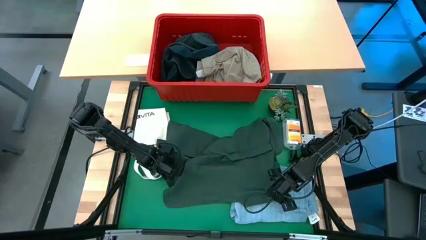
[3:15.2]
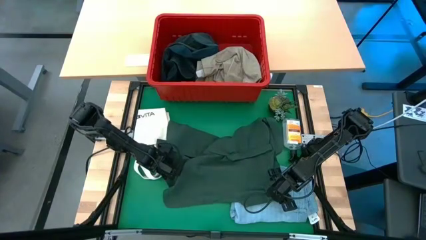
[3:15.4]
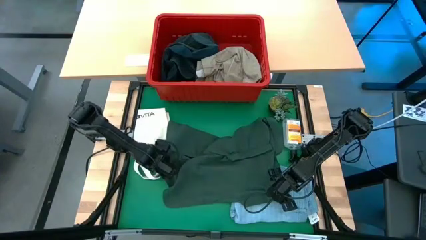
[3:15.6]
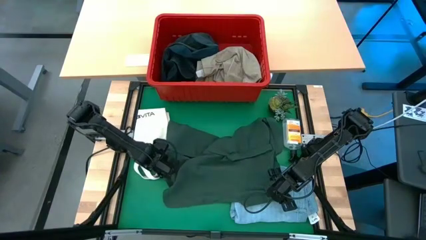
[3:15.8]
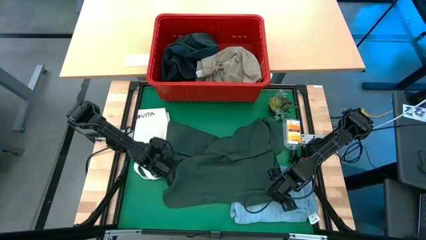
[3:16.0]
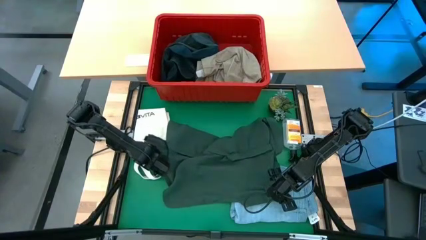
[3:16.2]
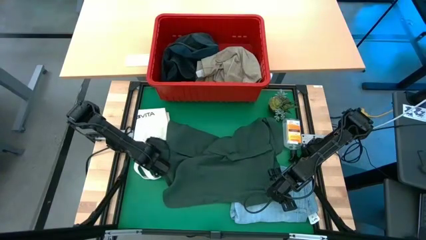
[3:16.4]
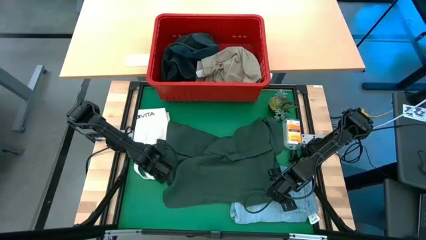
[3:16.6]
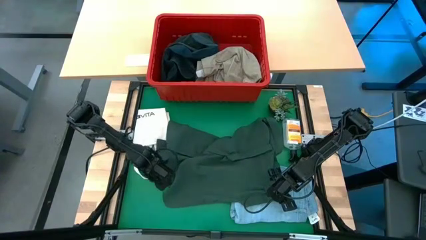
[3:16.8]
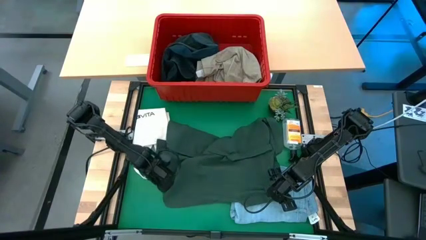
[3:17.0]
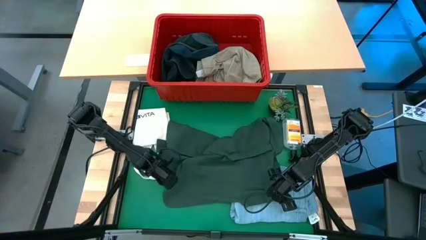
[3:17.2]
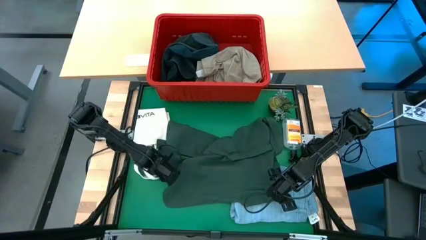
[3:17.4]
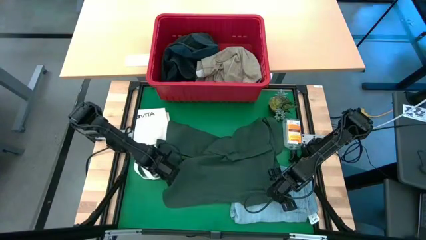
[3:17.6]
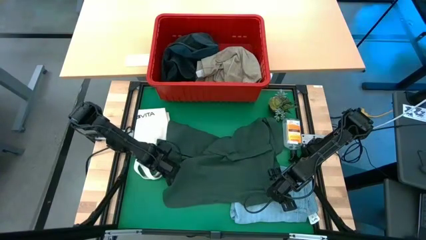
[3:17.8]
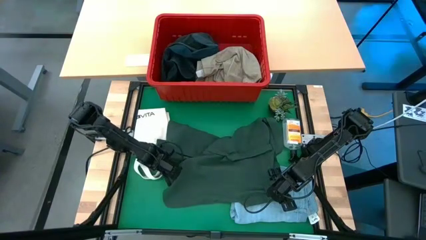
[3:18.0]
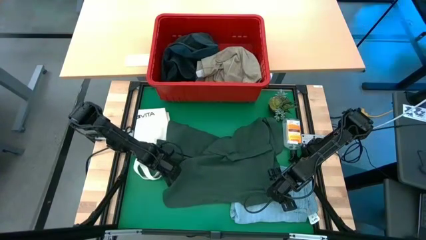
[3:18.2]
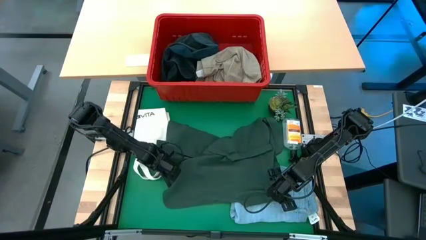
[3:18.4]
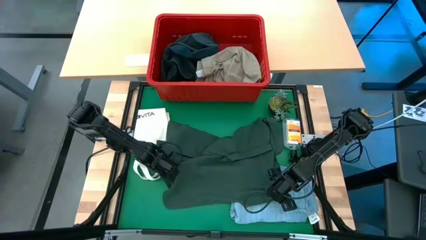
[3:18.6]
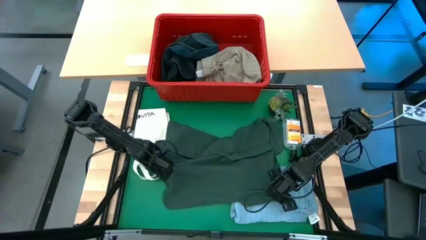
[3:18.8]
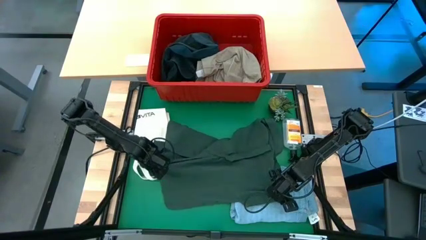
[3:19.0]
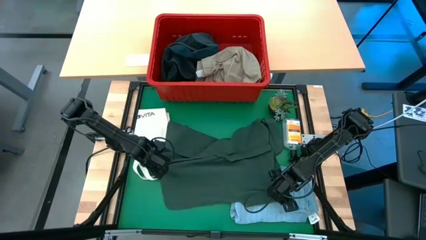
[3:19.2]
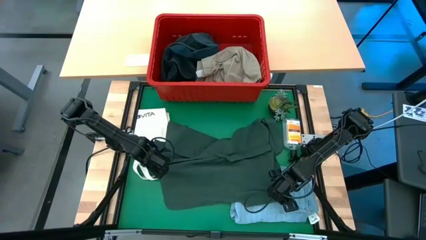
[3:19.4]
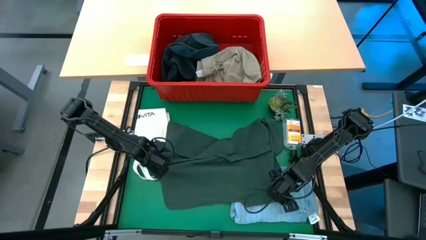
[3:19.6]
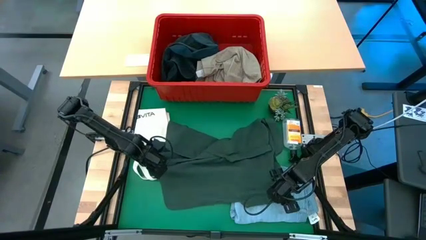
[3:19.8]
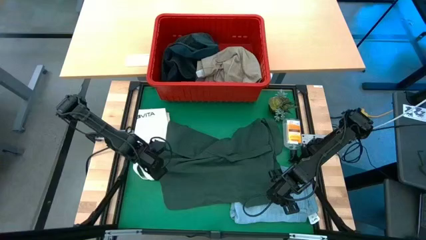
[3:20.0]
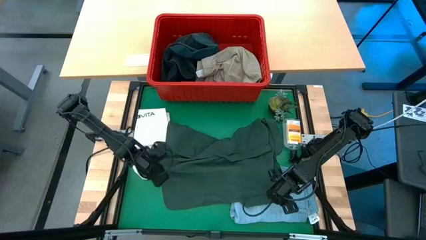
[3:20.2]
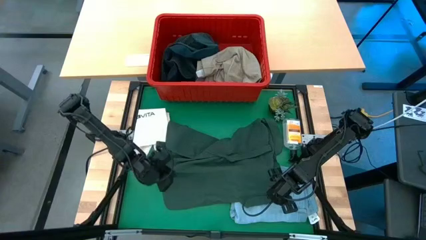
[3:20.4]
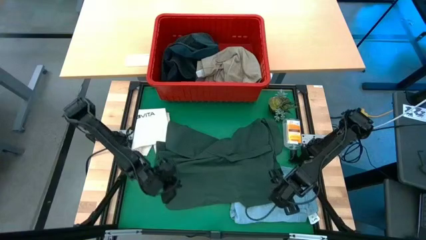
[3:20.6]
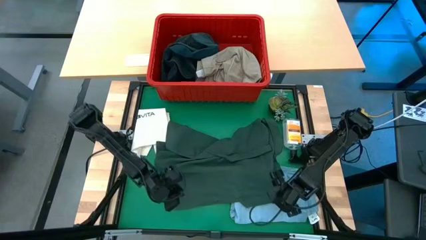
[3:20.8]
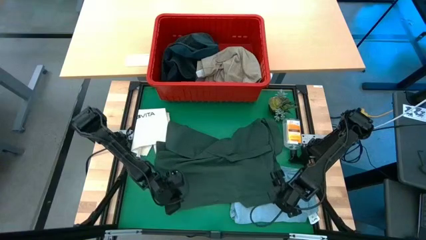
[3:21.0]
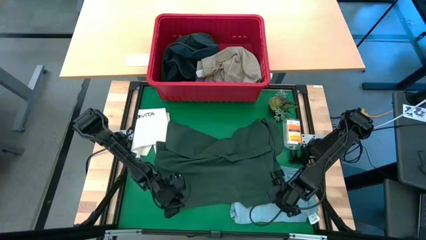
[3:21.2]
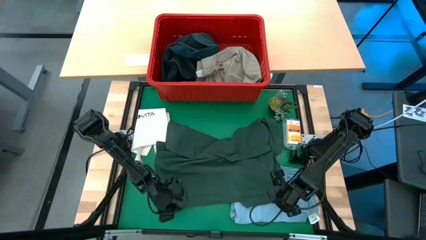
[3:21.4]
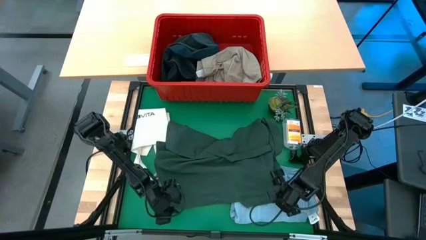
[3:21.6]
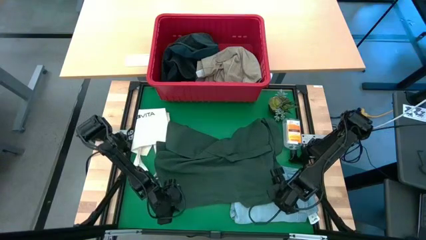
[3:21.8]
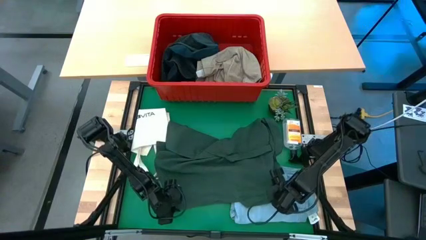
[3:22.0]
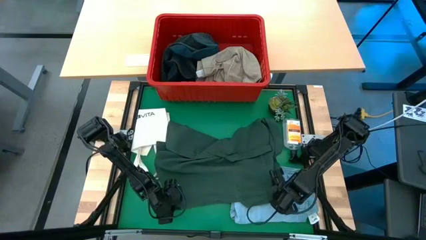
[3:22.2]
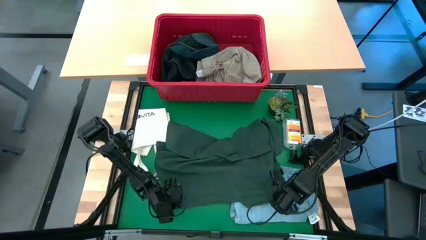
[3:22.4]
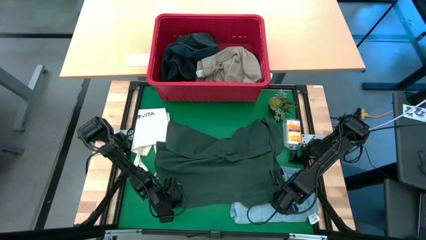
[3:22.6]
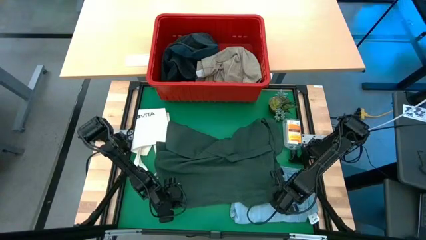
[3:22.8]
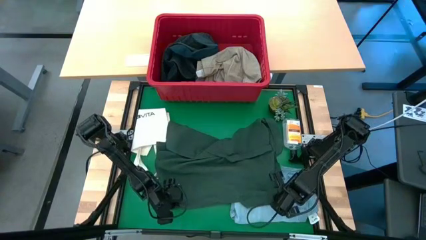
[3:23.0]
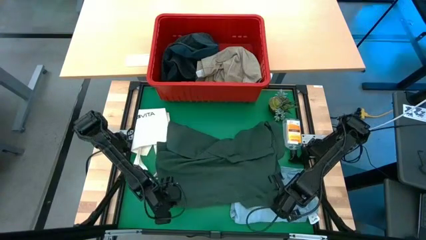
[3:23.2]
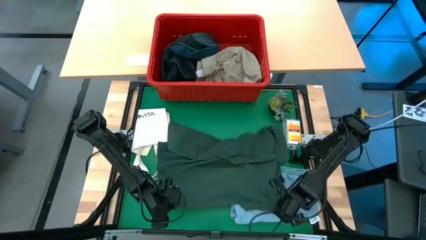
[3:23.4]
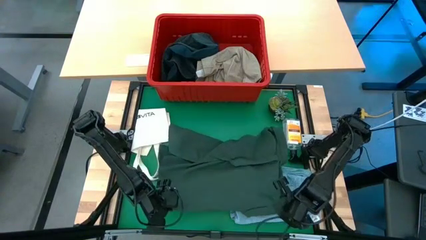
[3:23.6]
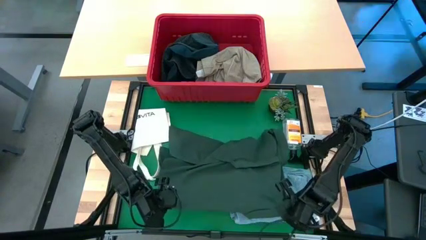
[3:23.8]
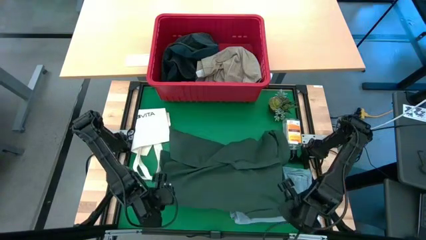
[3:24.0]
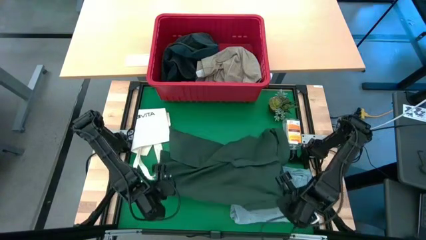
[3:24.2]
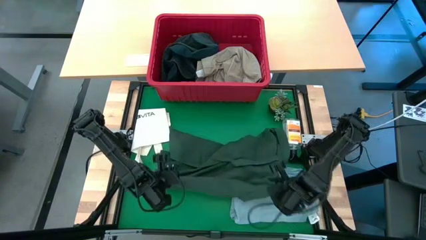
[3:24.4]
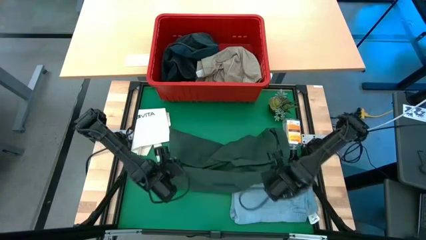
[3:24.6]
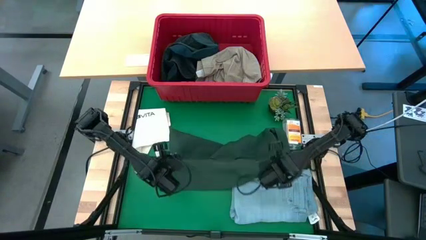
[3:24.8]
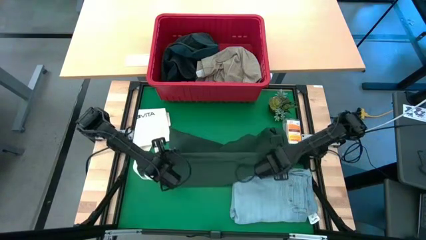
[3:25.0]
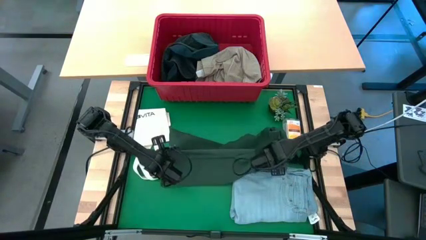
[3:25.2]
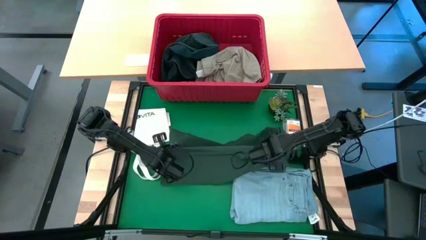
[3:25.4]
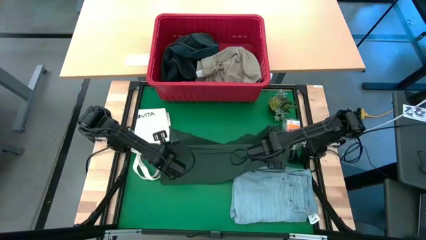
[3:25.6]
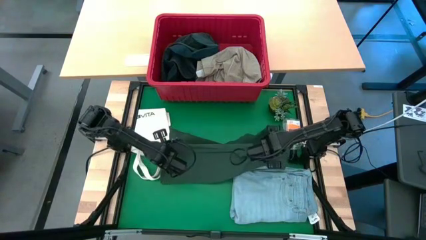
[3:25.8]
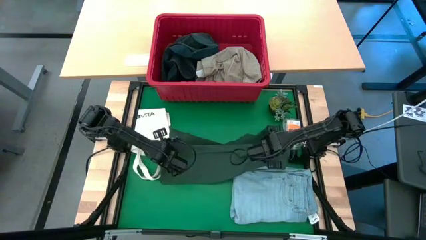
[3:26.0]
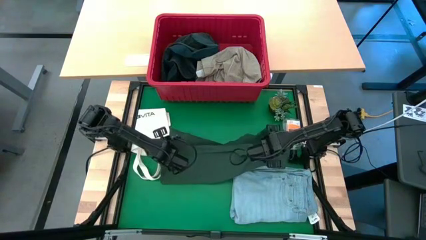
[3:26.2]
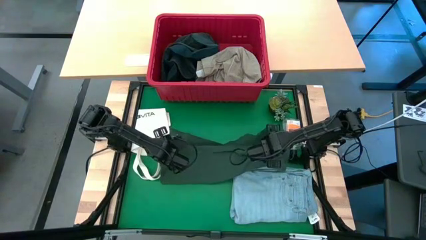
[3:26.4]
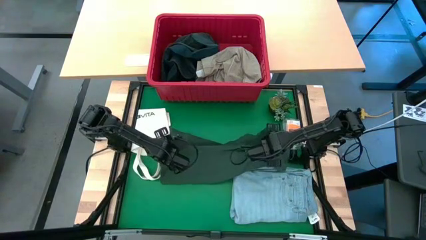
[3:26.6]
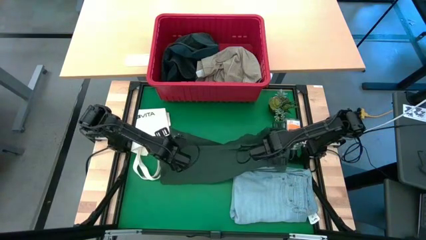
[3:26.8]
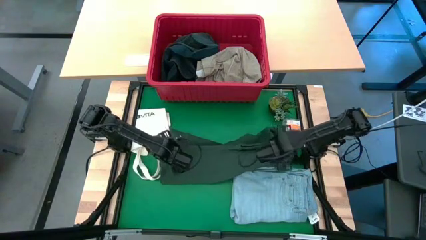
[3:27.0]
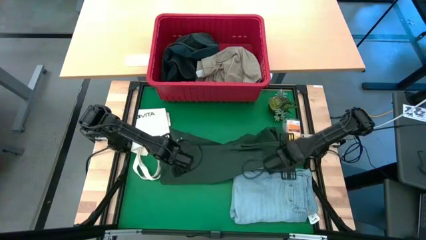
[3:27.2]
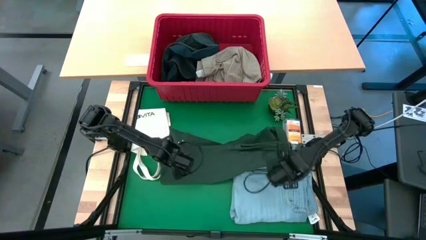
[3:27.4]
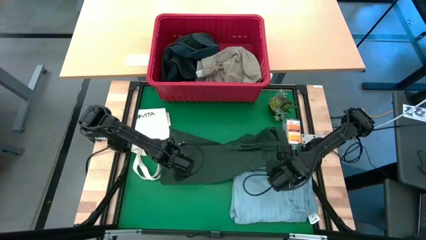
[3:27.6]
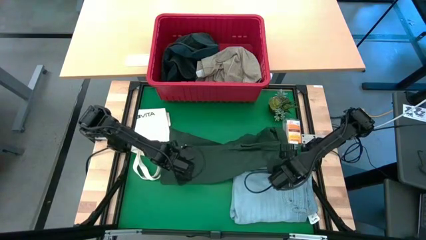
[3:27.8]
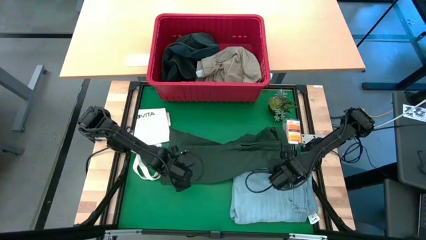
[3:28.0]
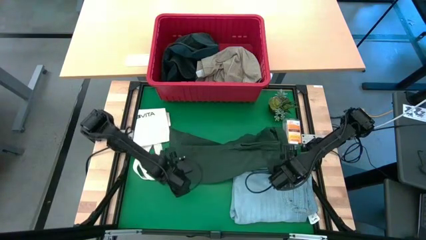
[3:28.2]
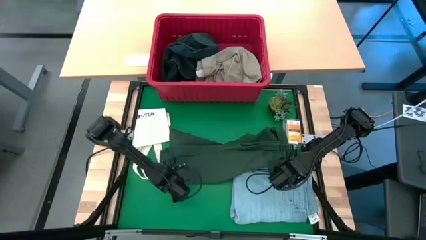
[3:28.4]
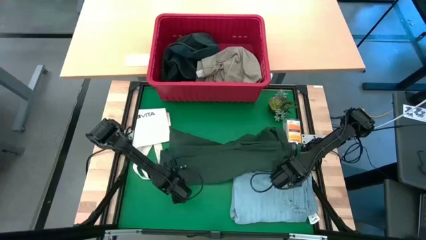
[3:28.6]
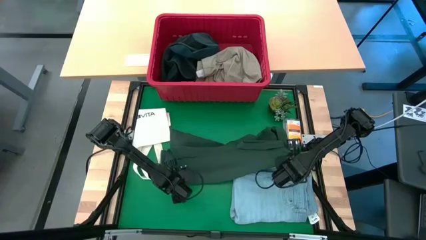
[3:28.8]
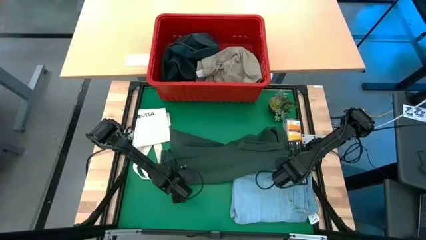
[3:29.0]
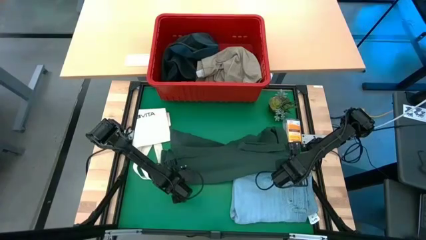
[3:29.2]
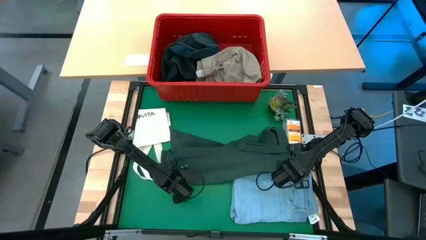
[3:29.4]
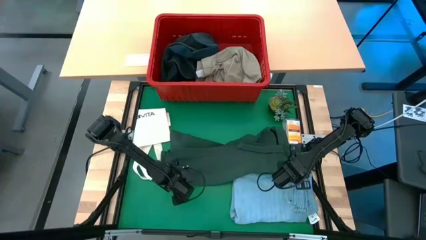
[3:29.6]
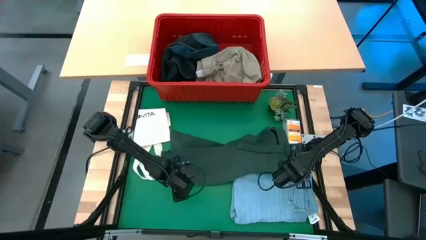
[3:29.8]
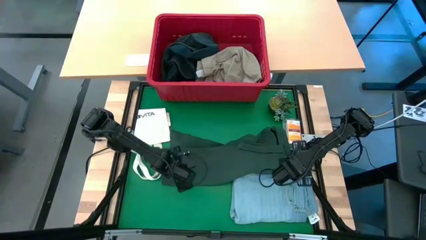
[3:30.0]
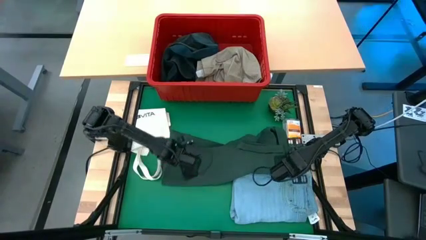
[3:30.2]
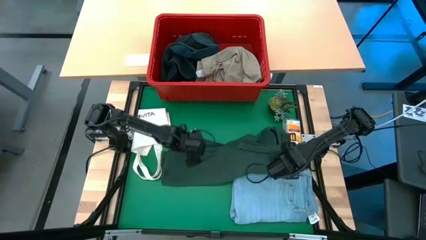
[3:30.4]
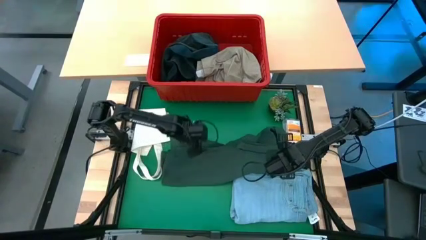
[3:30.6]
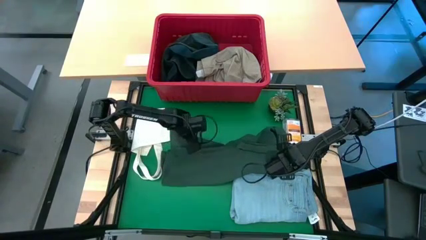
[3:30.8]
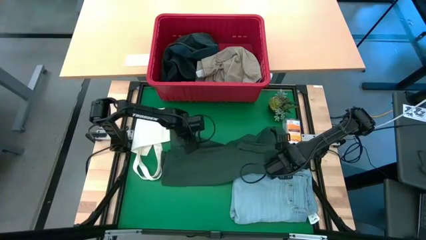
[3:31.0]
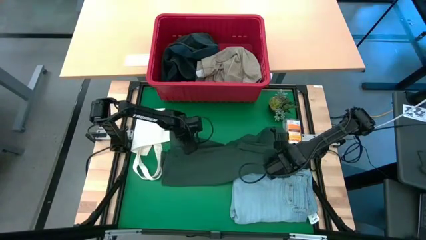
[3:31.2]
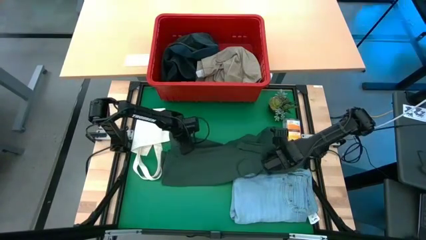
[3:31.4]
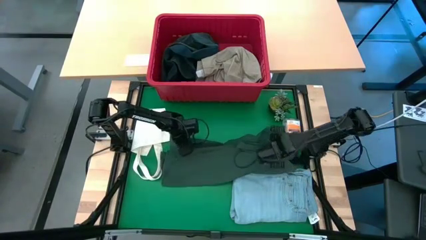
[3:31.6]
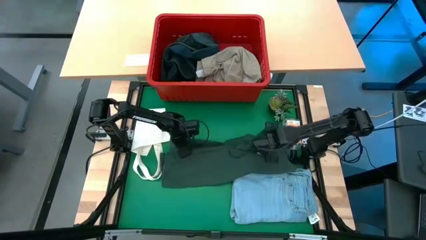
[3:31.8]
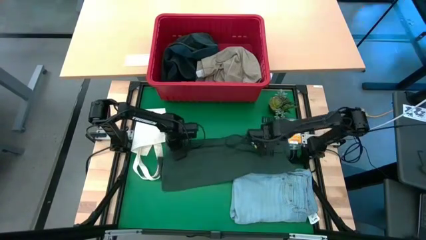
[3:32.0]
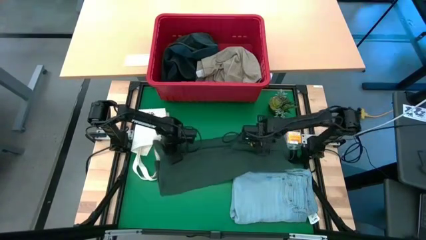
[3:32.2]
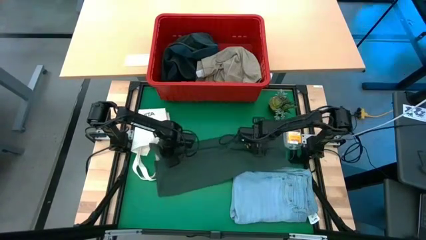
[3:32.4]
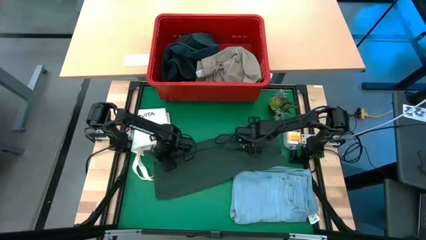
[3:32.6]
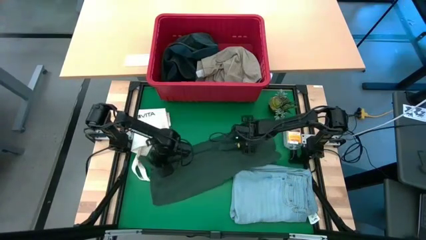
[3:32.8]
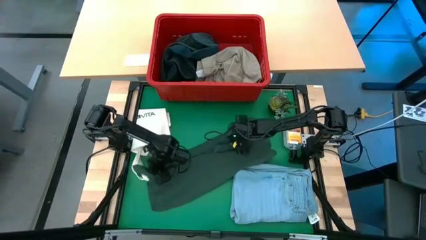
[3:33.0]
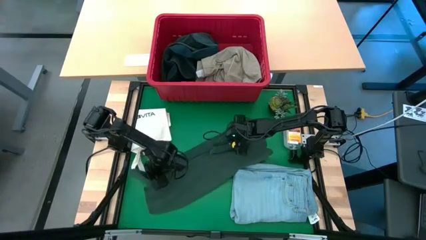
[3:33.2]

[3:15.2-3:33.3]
Task: Fold Laundry from Bin
Fold the green shirt
